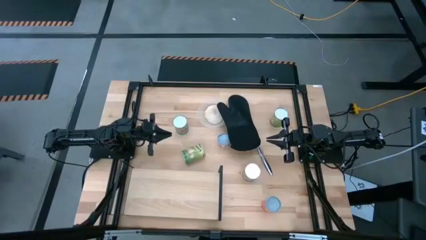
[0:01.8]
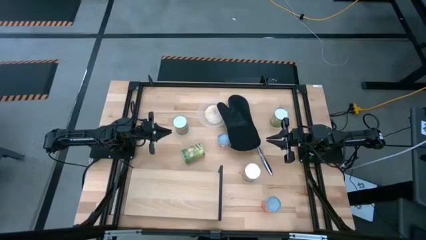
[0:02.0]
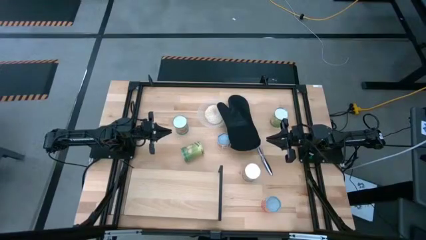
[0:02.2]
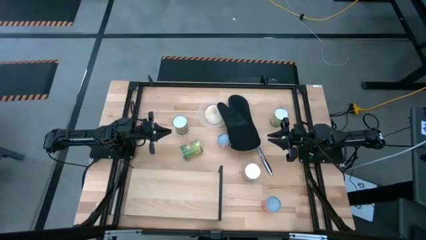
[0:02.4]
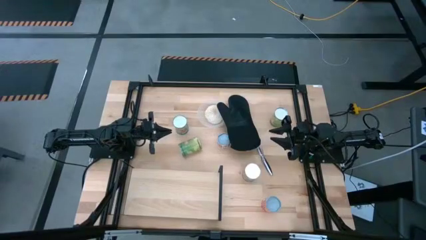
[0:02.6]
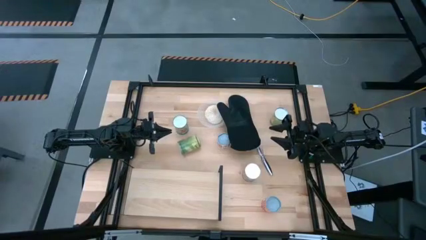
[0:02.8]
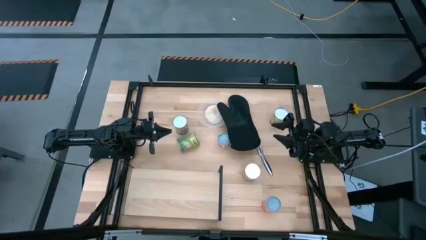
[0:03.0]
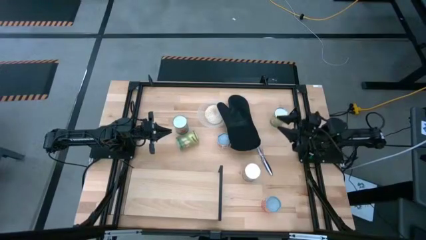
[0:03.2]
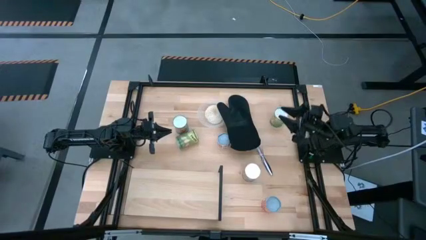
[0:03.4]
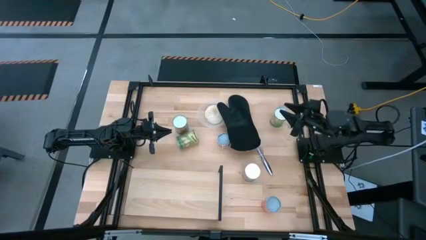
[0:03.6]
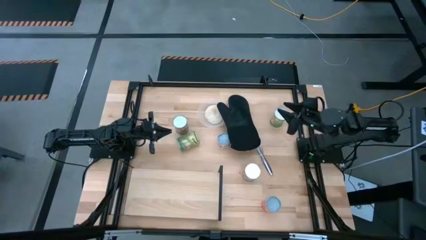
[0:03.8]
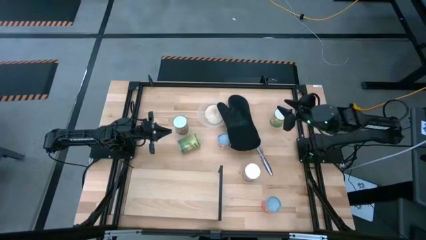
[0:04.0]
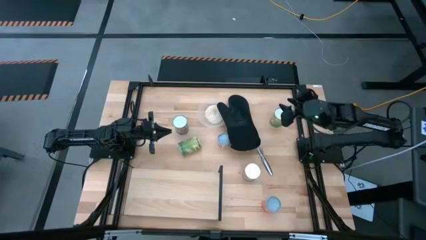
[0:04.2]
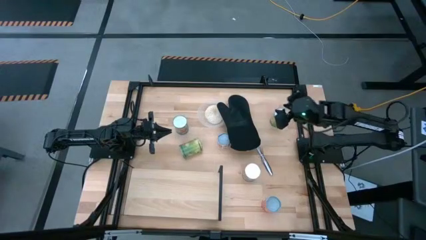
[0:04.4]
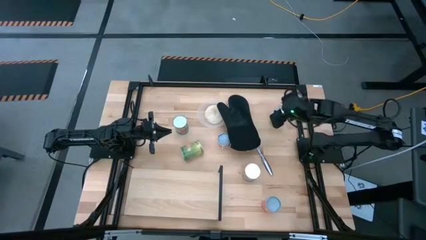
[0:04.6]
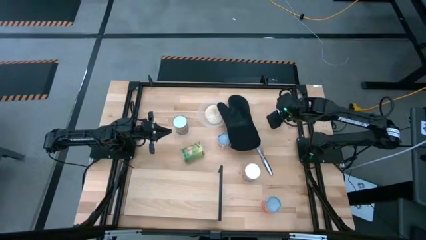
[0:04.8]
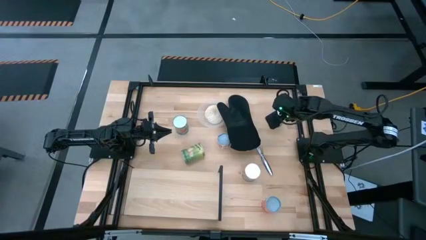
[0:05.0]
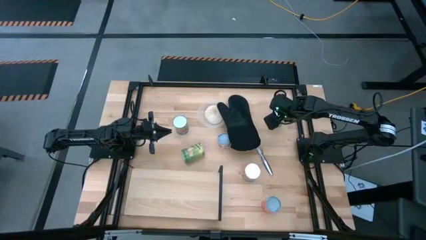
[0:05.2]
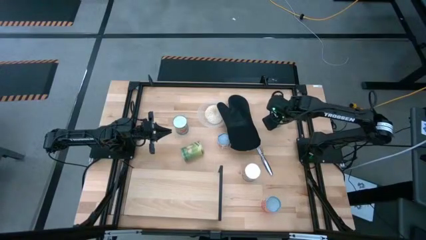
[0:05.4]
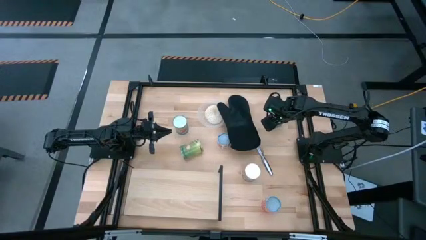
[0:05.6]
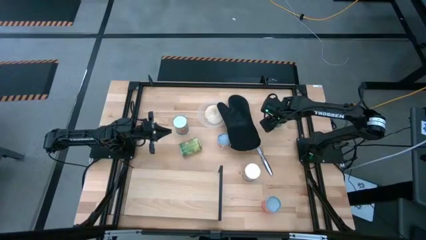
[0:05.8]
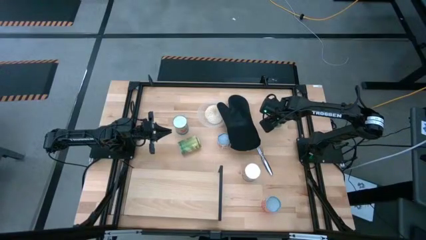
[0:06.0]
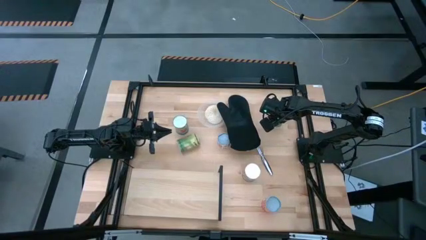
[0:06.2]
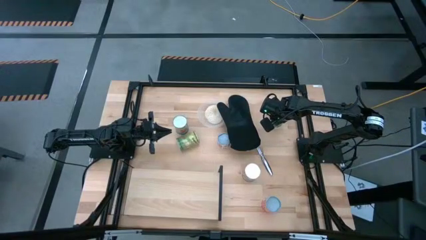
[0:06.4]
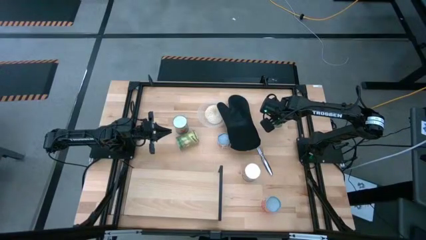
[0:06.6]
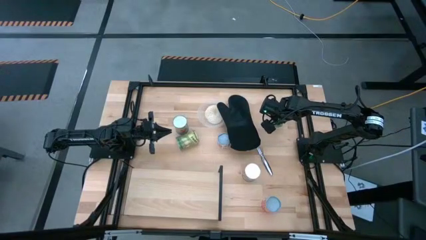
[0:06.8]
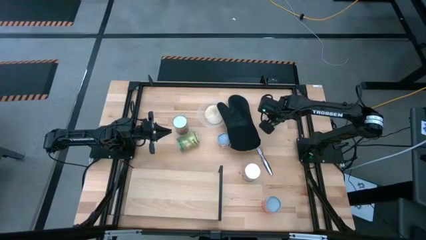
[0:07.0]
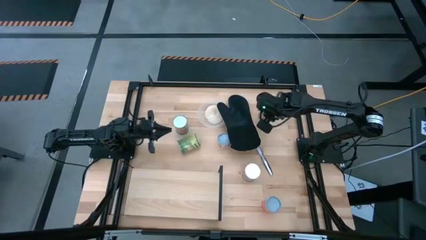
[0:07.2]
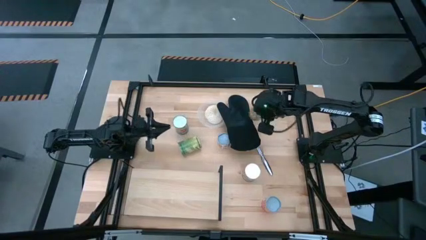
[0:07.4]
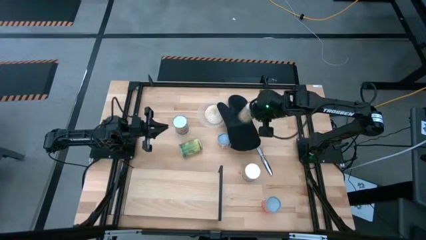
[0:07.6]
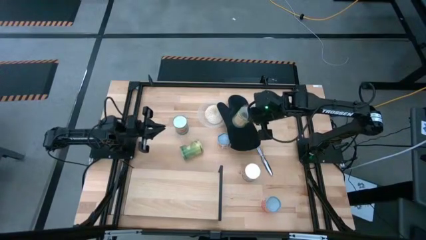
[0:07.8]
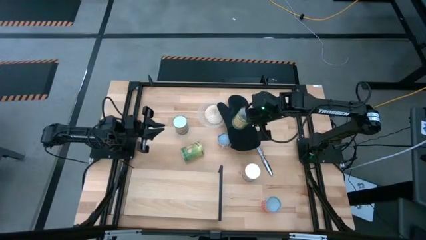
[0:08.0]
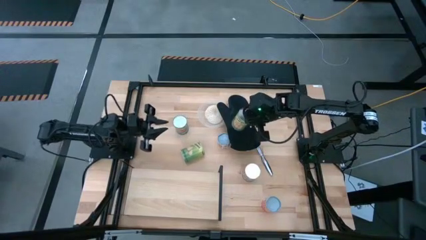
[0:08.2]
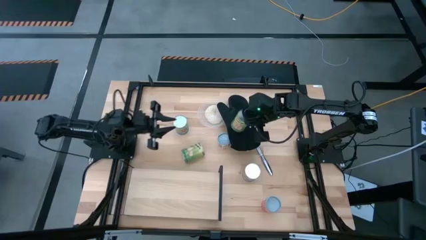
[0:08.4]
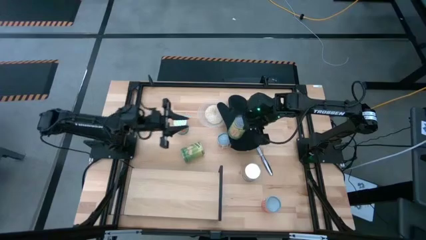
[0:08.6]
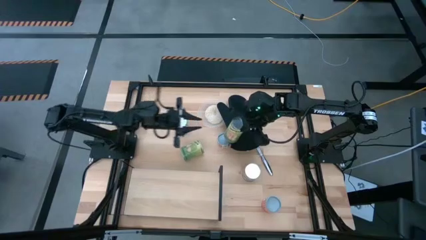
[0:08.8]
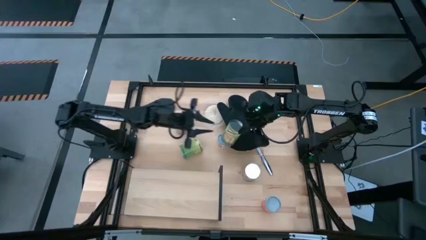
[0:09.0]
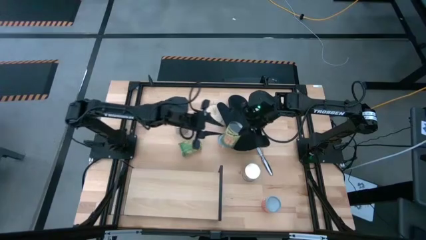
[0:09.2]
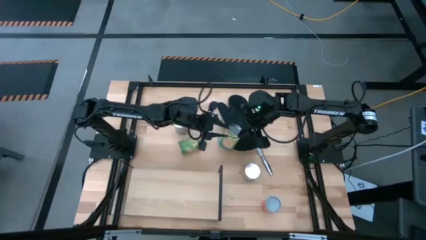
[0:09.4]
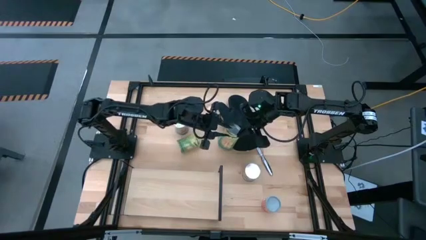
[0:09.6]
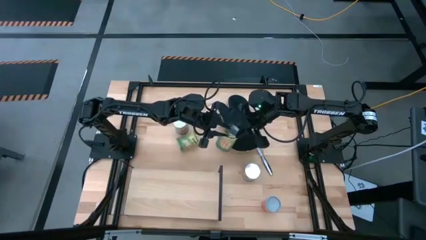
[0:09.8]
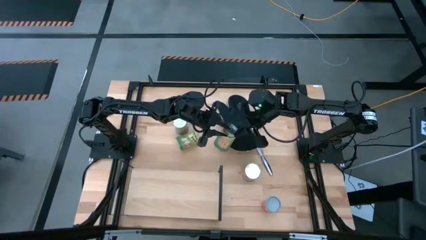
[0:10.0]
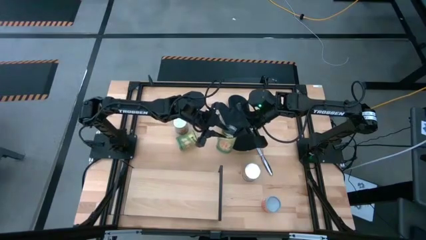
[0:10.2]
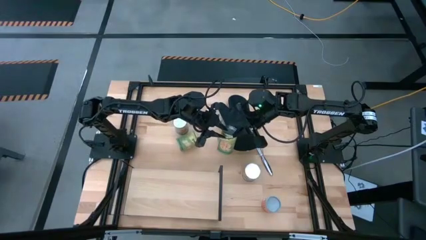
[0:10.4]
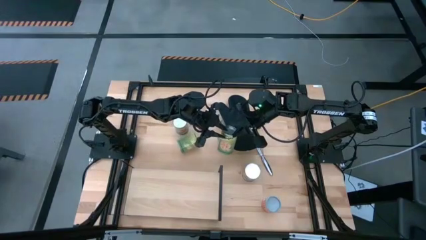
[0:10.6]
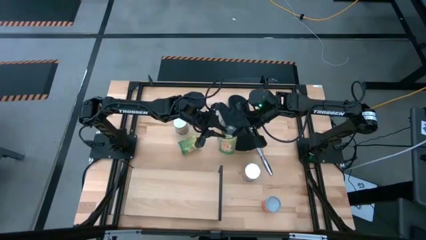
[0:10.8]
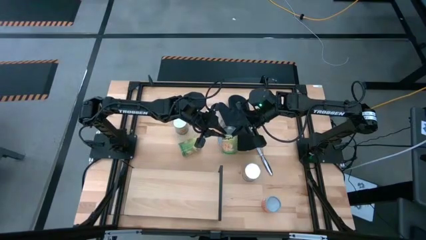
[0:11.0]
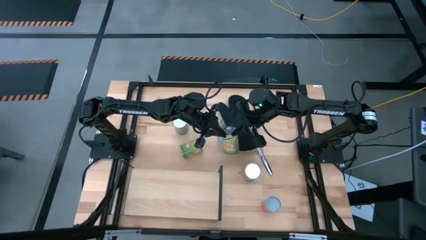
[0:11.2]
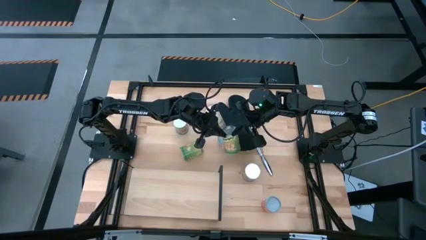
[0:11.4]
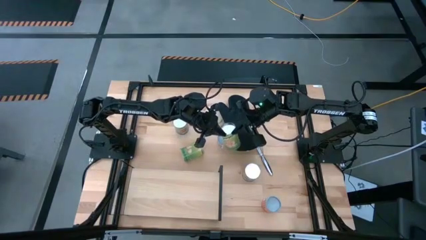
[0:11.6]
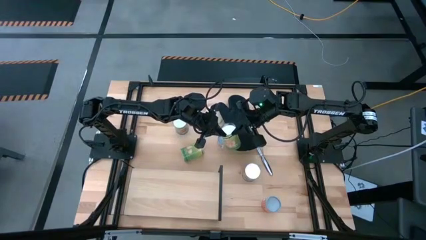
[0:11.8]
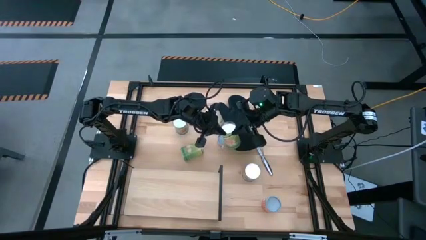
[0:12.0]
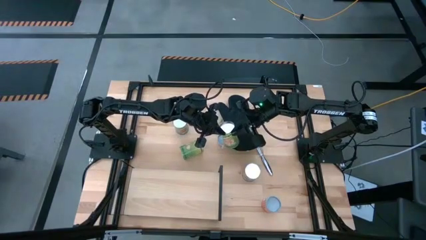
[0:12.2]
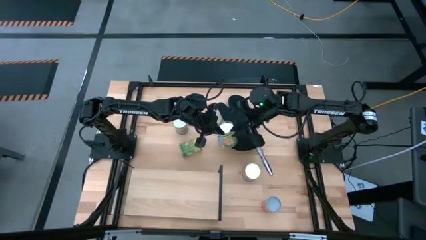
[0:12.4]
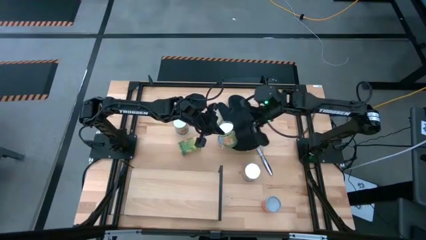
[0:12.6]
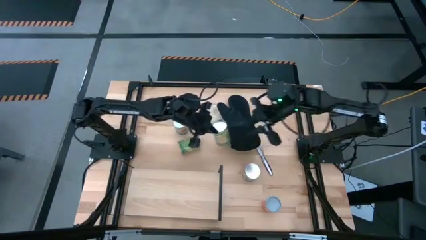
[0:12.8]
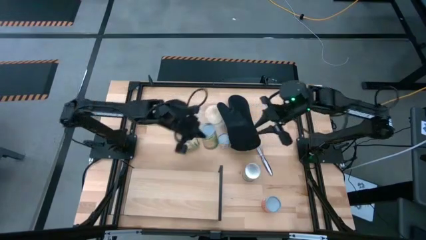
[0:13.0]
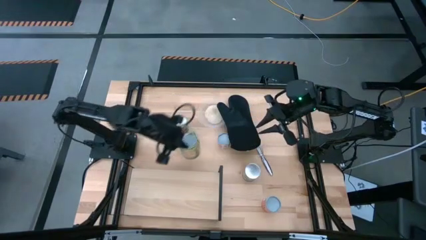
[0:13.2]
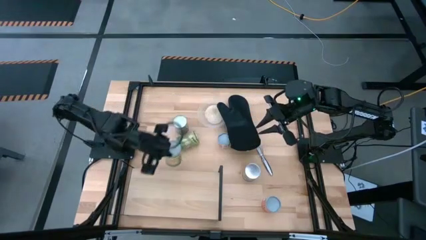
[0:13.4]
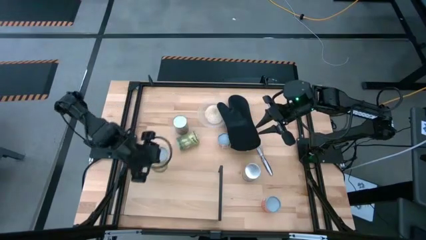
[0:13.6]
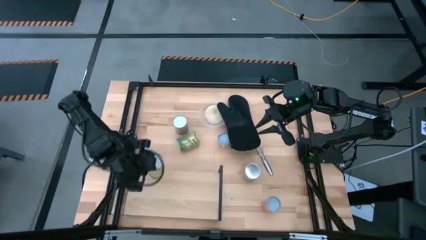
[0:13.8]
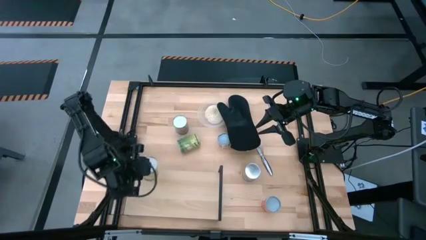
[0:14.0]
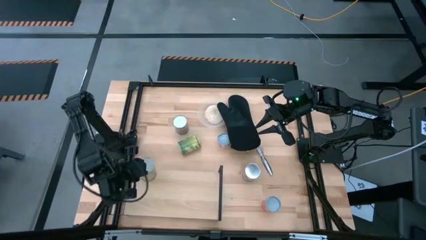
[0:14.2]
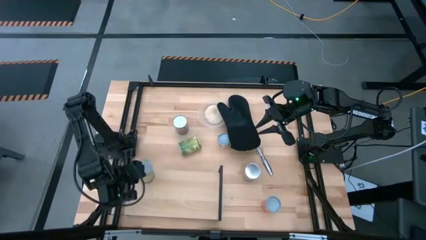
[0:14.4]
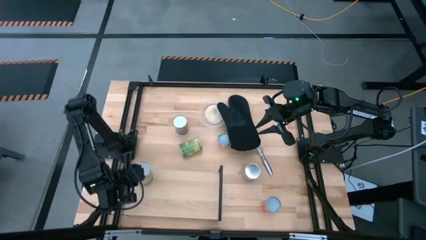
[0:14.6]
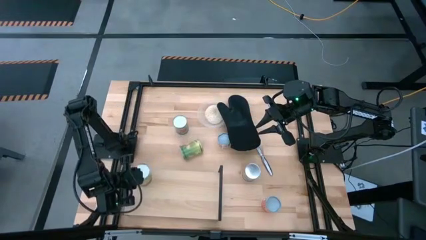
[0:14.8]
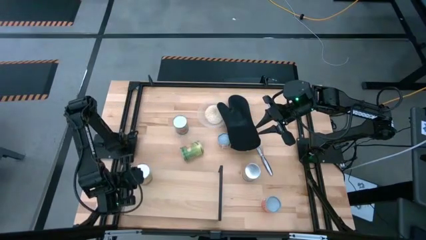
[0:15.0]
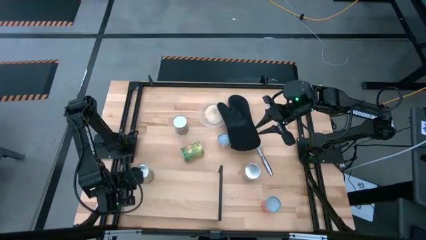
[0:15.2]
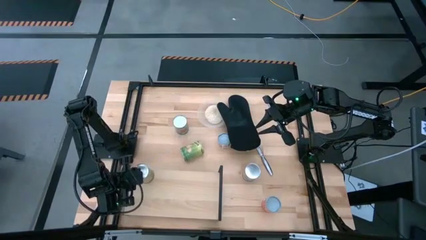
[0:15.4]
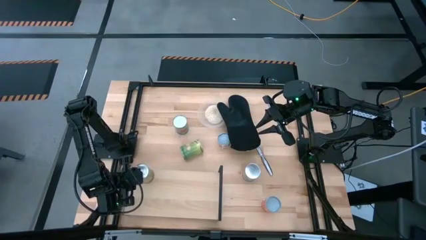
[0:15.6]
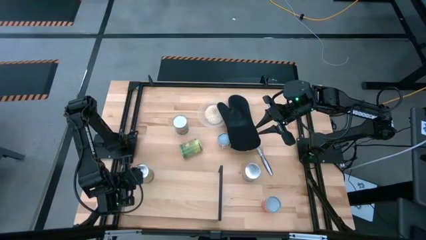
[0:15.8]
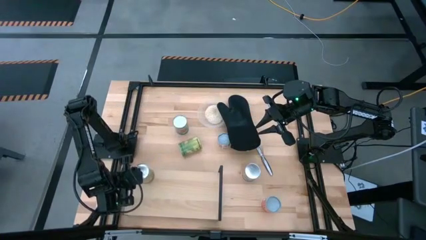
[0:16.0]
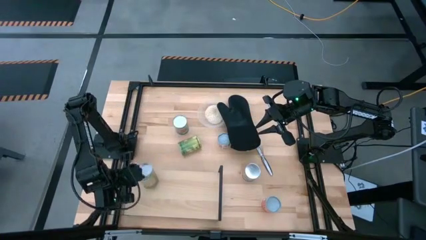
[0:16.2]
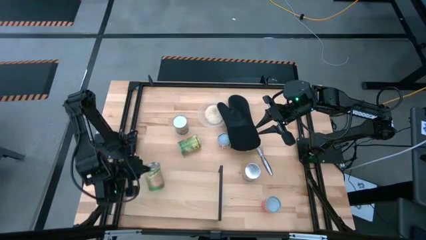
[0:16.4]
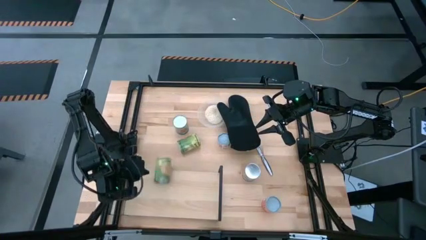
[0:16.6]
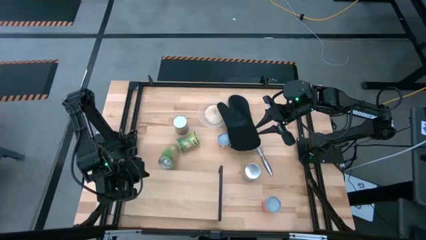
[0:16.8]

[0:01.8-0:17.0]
Task: Pick and place cans onto a shelf
Put the right green canned orange on the shelf
